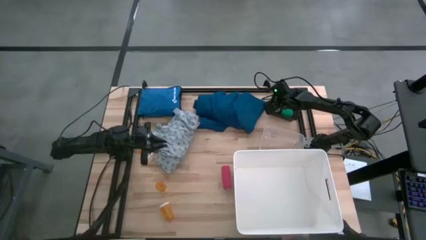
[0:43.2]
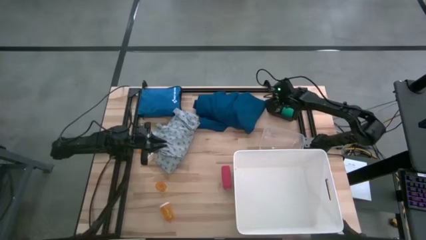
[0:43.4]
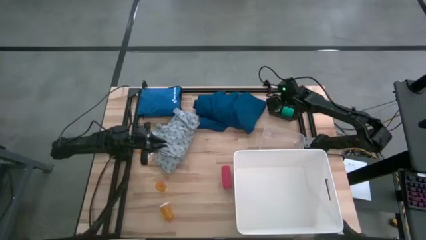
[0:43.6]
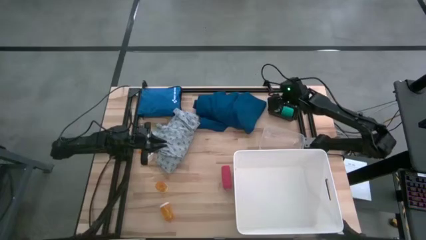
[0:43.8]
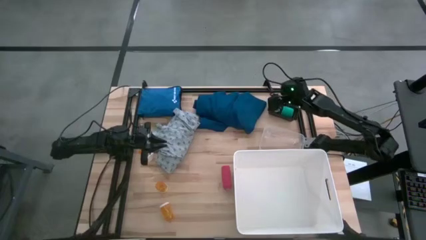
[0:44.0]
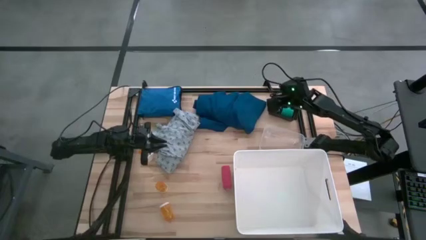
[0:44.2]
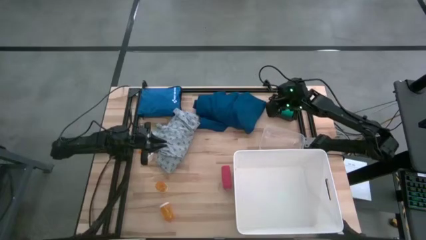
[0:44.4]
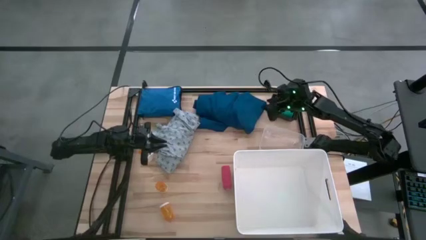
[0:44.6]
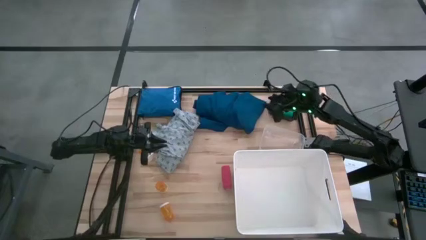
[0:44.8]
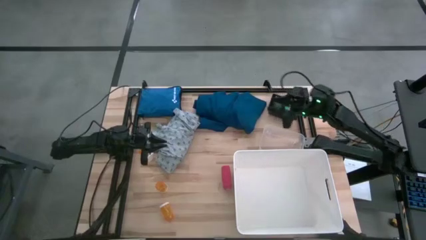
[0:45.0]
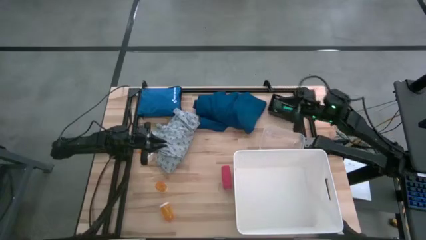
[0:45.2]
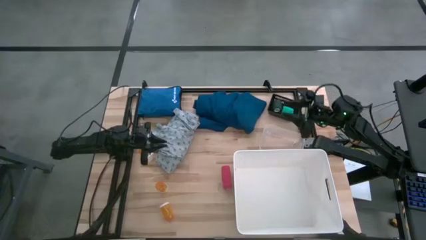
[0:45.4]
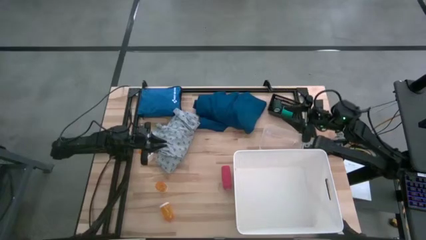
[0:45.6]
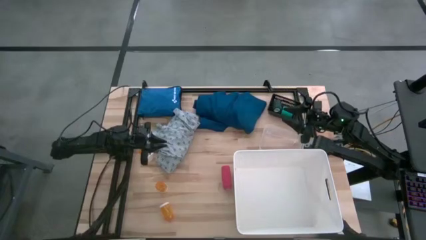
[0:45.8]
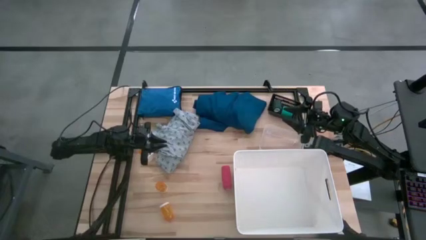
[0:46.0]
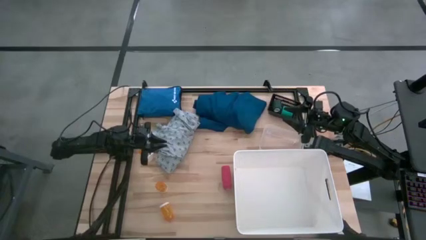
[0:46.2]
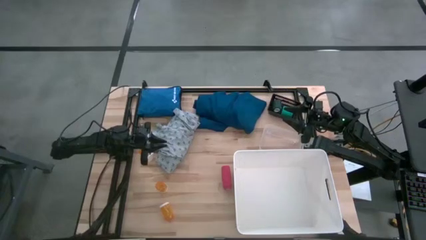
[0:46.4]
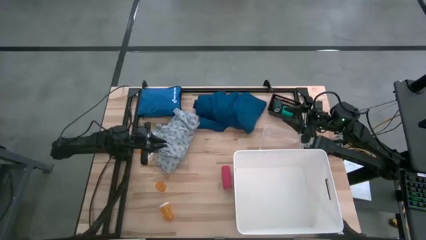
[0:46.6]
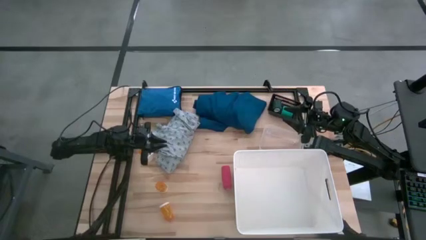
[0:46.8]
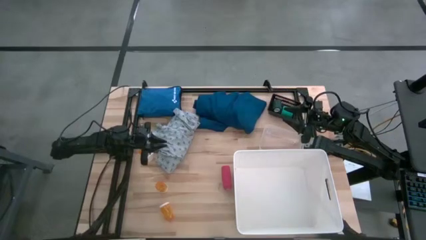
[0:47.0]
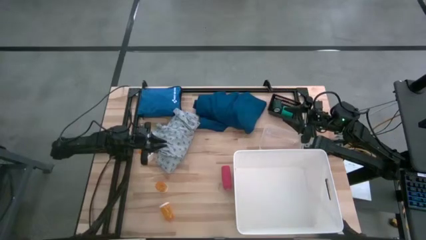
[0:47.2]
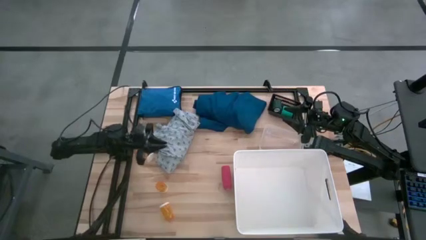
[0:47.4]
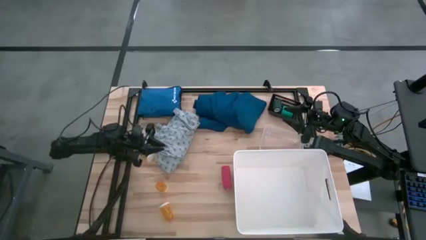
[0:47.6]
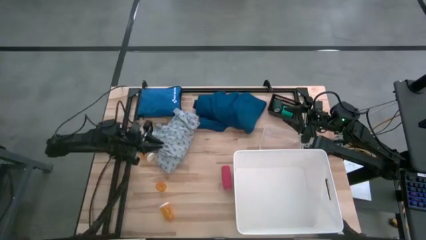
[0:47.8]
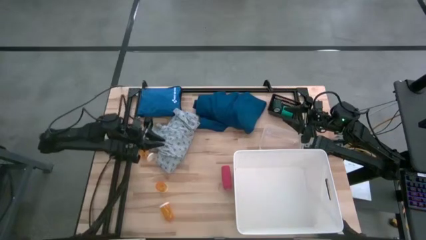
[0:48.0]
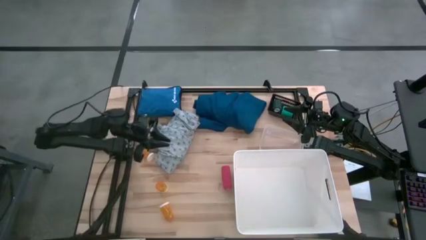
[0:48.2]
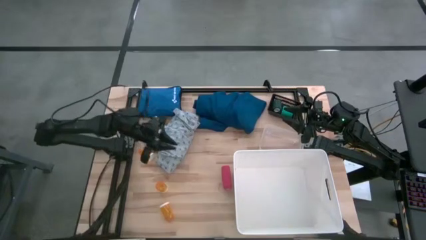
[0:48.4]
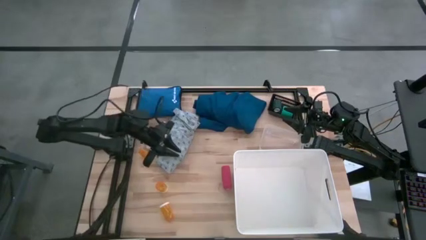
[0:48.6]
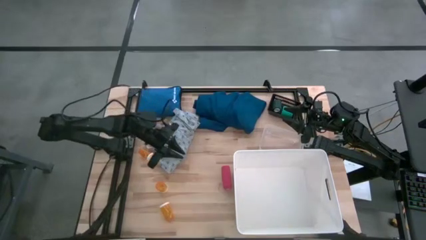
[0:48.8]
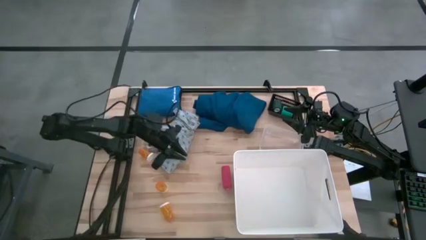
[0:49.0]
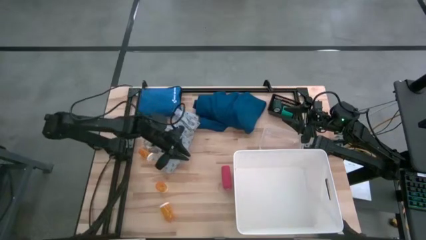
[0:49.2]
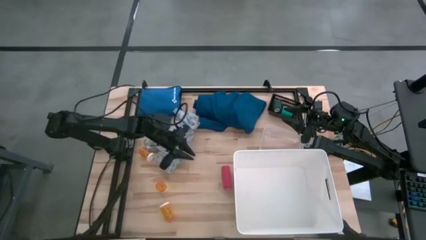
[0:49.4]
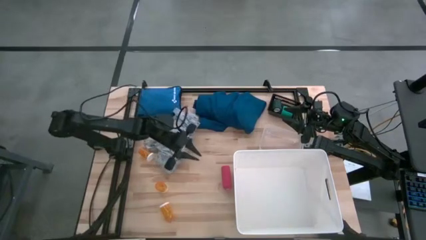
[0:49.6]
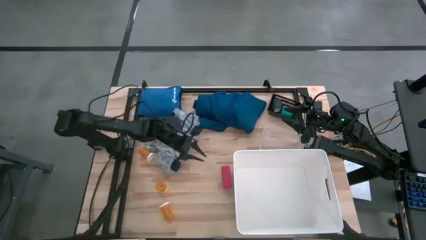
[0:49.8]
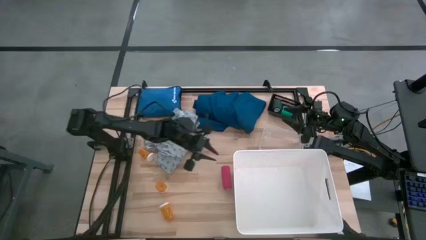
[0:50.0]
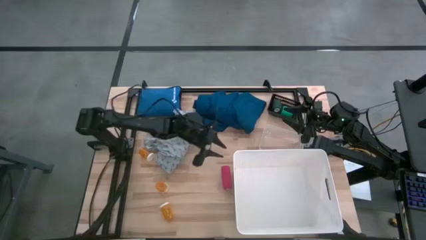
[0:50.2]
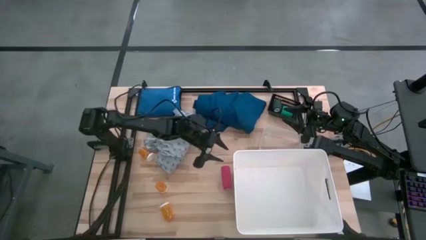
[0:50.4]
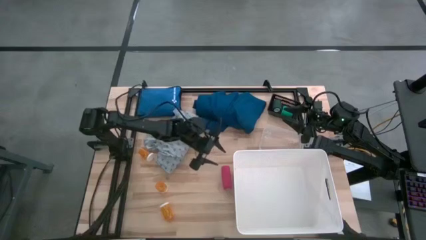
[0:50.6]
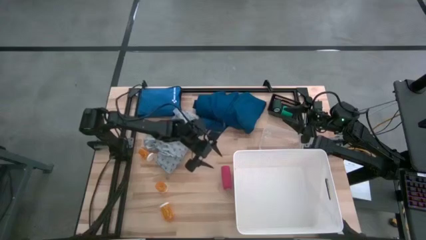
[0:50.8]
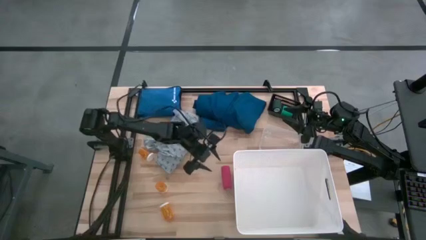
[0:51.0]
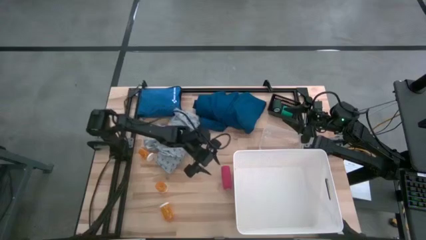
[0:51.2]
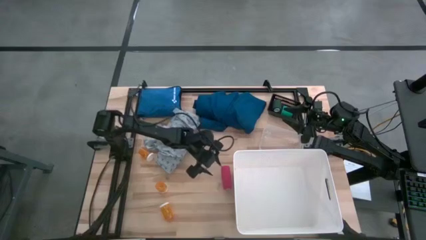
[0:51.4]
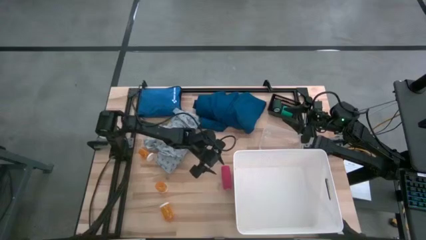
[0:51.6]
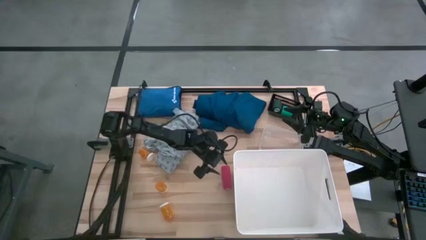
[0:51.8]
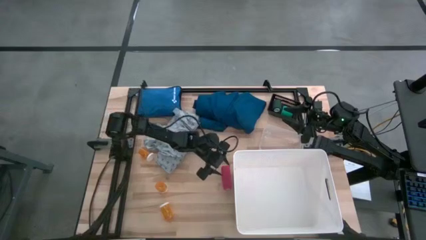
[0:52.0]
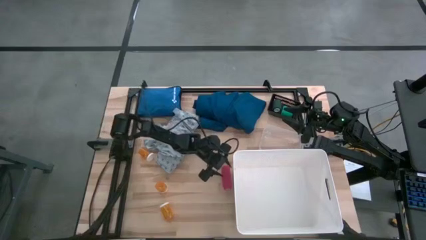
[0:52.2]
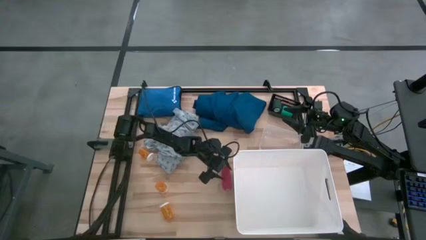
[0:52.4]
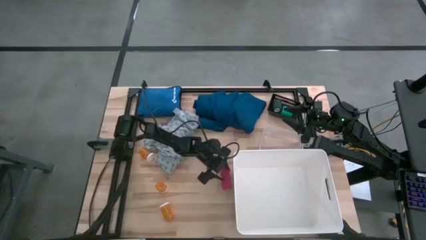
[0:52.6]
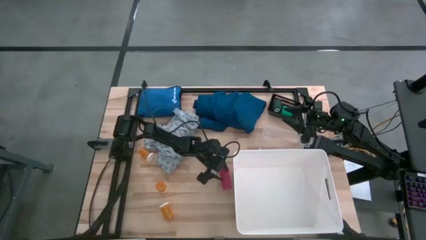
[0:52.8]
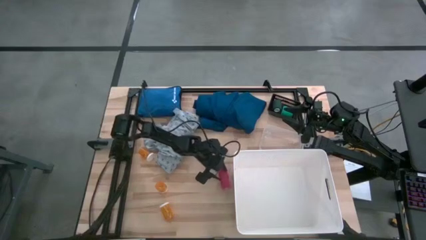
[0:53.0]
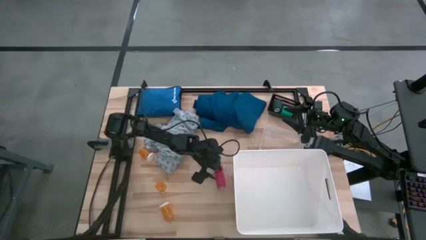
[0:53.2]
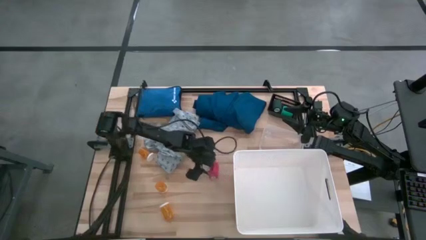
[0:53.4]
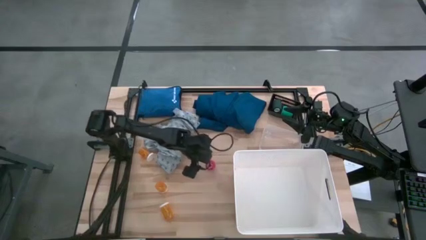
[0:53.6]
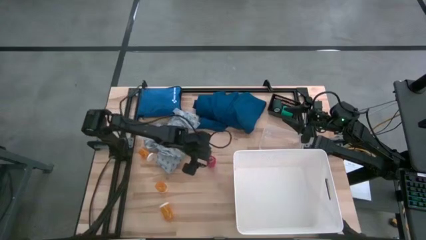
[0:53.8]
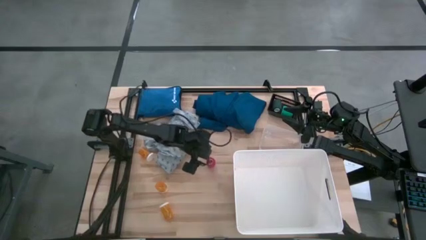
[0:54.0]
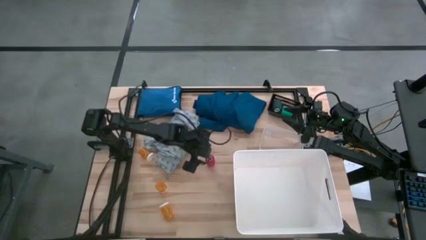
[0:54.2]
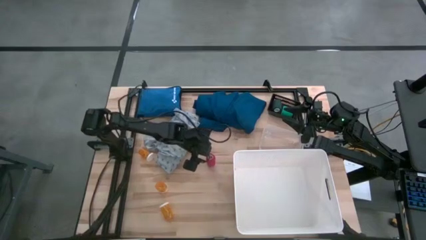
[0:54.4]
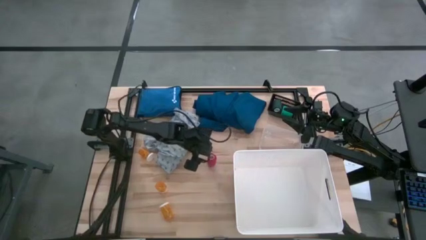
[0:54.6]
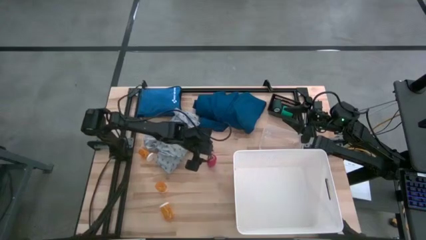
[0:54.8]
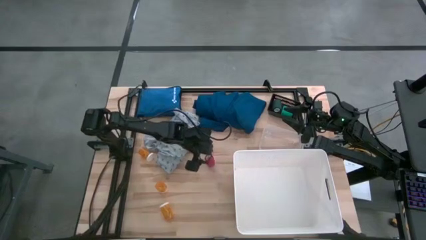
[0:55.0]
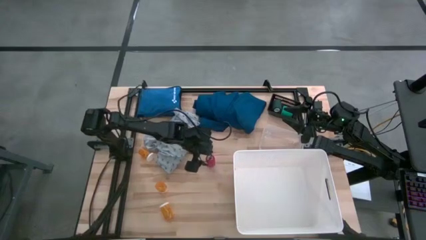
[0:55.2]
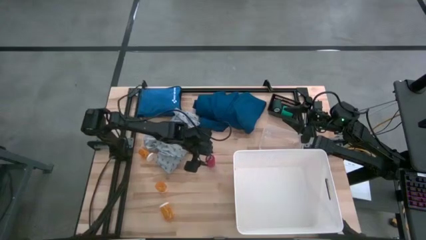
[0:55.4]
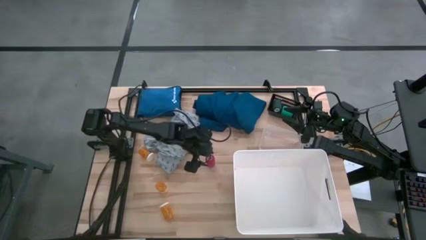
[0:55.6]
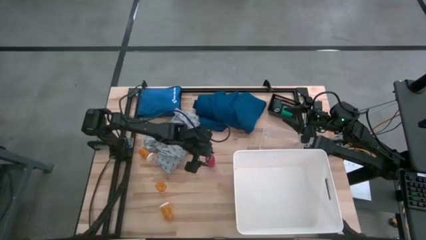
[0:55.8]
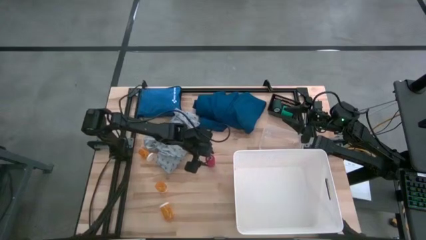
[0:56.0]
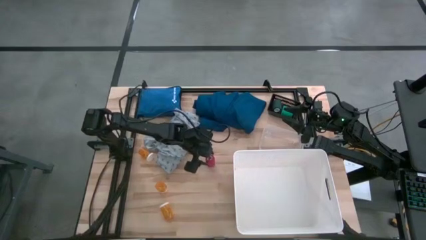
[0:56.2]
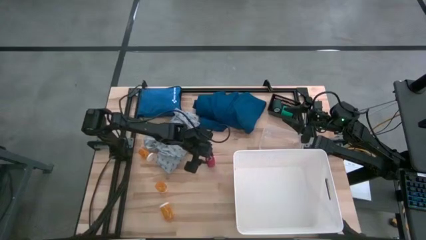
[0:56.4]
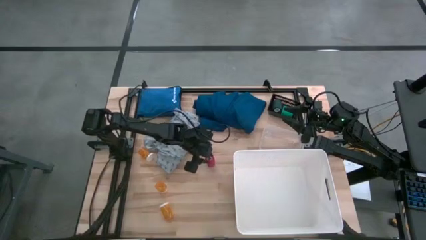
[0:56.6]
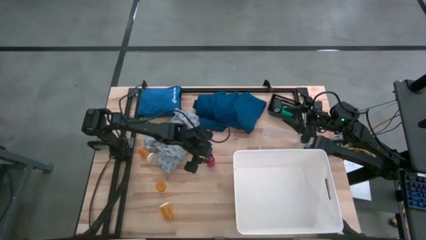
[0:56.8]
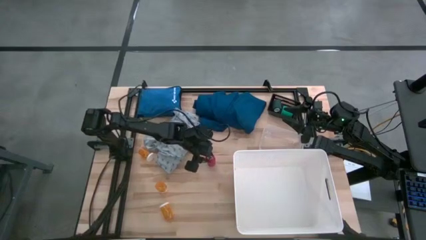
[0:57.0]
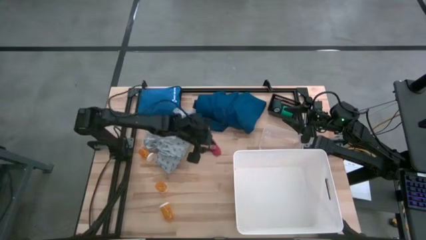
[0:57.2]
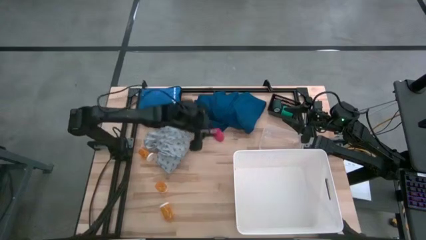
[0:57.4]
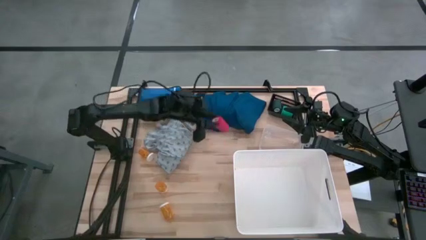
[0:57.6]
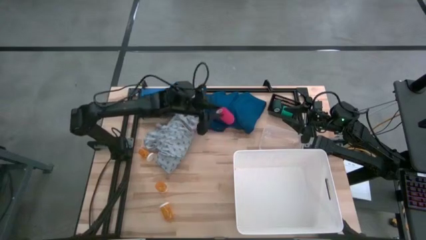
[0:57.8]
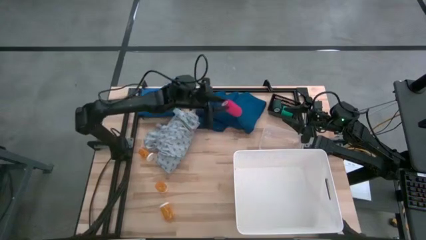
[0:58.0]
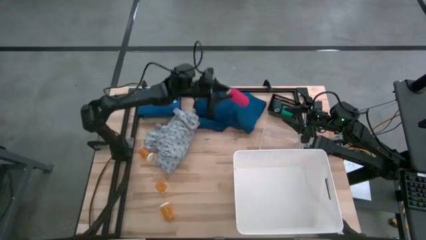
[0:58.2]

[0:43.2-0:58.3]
Task: Pick & place medical supplies in basket/bin
Put the pink bandage into the black bin

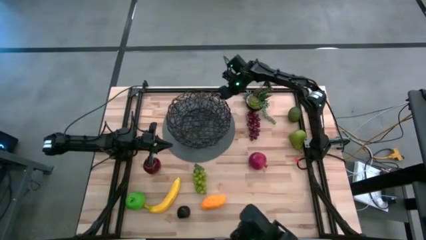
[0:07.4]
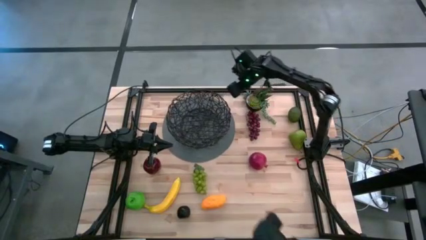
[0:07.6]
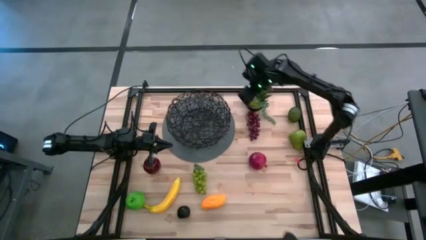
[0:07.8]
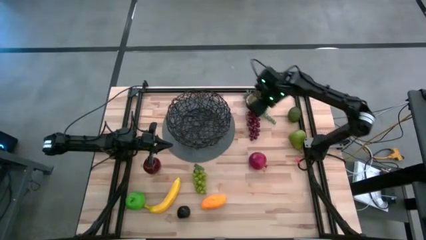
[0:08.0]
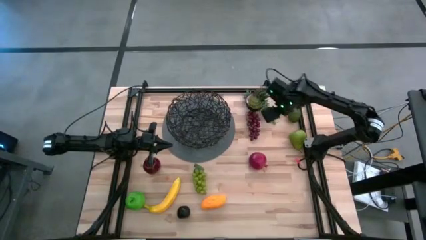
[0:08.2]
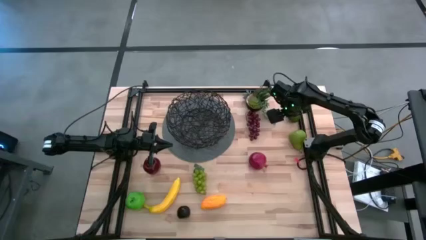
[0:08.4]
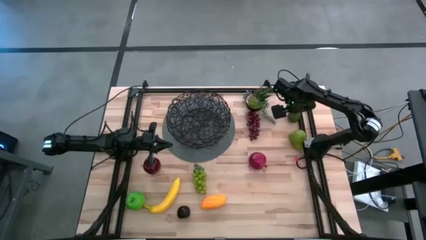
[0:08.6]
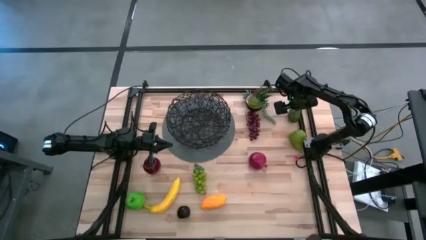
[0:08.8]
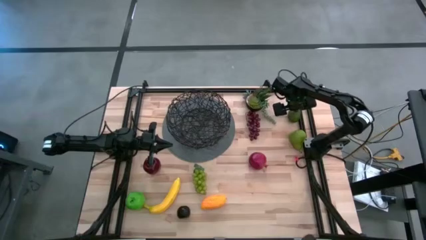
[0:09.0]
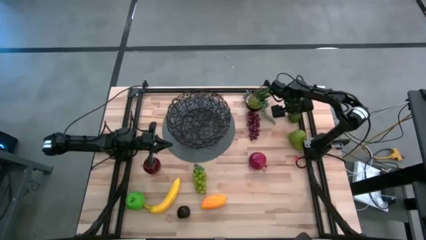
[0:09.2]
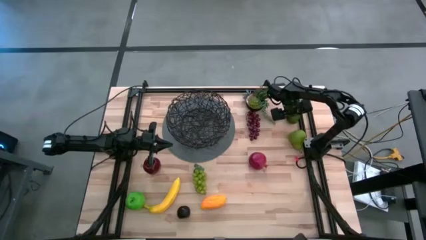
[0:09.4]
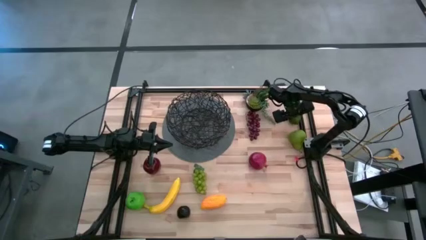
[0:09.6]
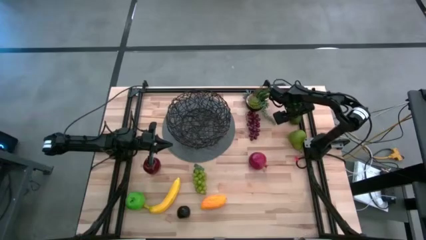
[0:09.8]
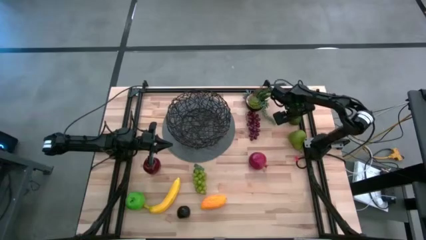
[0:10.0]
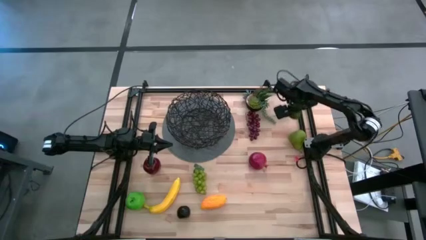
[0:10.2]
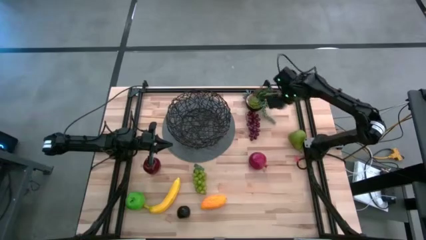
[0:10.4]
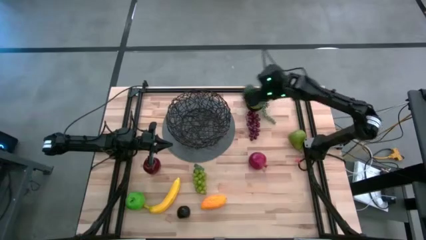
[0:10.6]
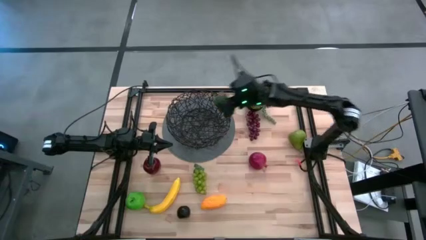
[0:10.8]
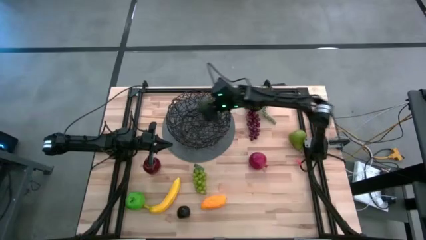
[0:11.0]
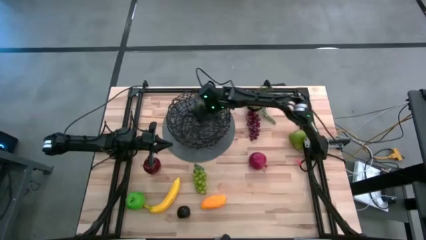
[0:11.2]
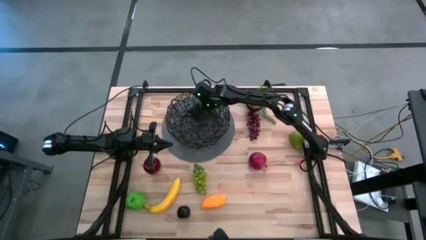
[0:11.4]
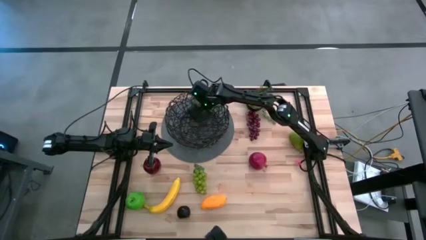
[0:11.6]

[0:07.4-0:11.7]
Task: Build produce basket
Put the green lime into the black wire basket
